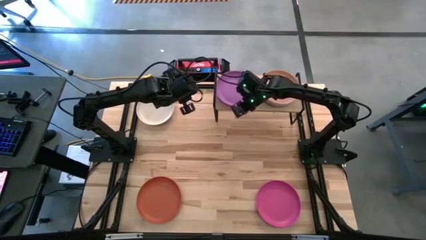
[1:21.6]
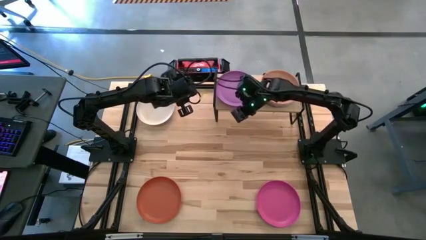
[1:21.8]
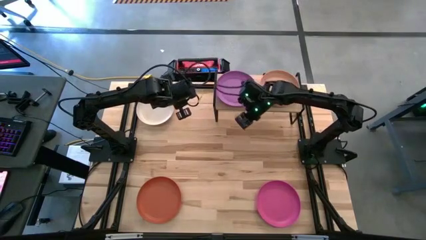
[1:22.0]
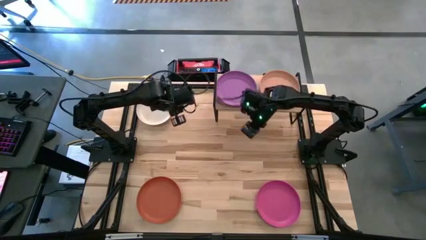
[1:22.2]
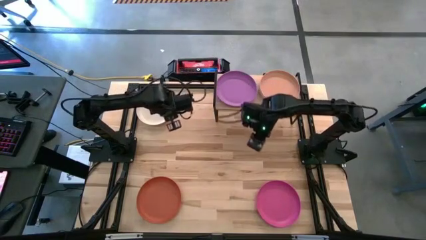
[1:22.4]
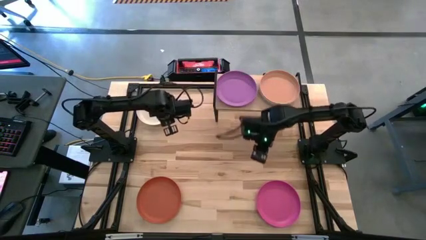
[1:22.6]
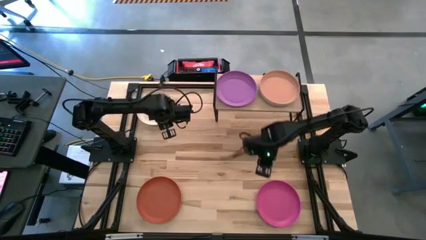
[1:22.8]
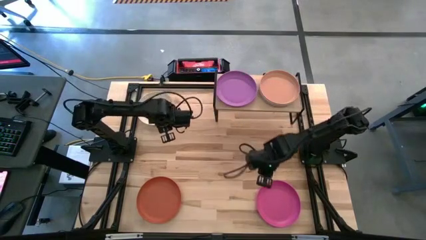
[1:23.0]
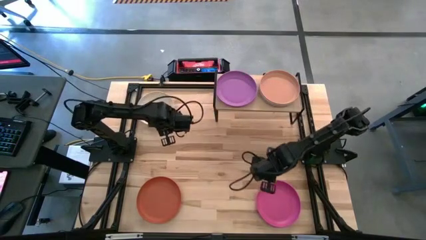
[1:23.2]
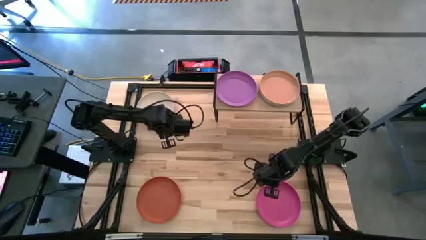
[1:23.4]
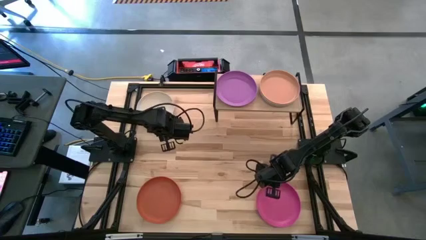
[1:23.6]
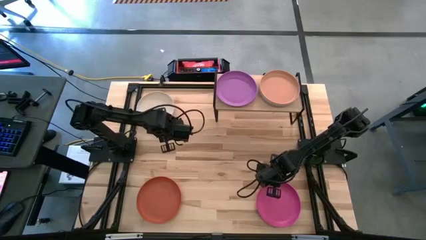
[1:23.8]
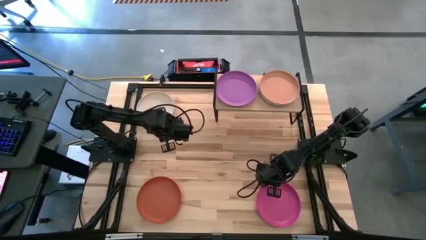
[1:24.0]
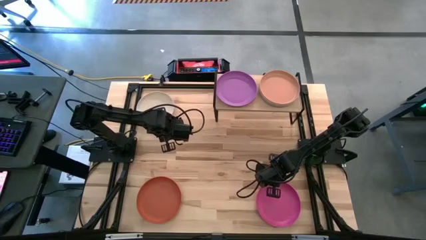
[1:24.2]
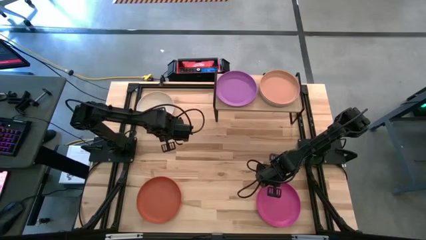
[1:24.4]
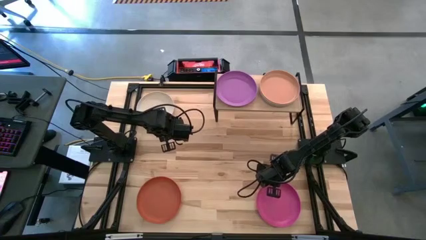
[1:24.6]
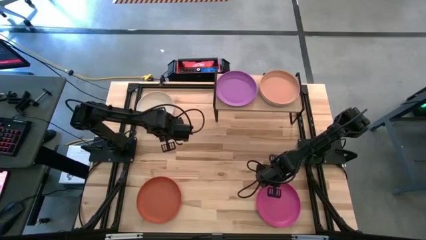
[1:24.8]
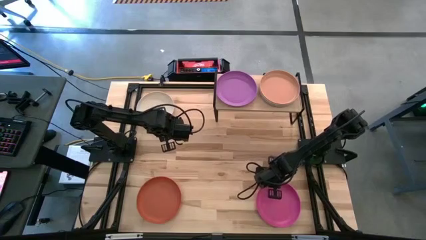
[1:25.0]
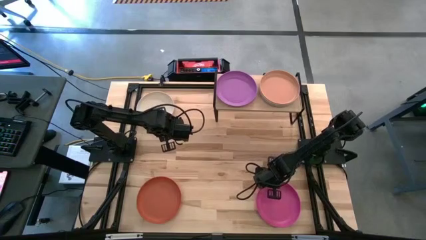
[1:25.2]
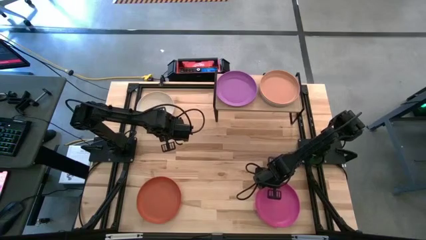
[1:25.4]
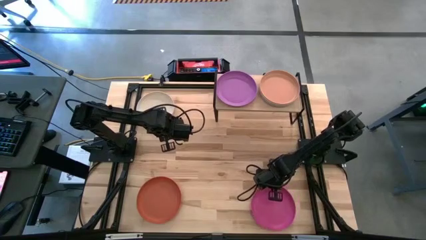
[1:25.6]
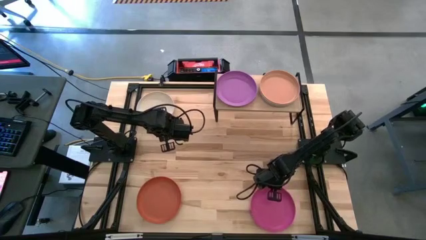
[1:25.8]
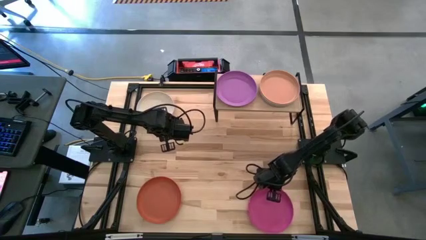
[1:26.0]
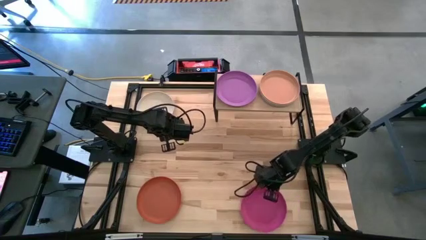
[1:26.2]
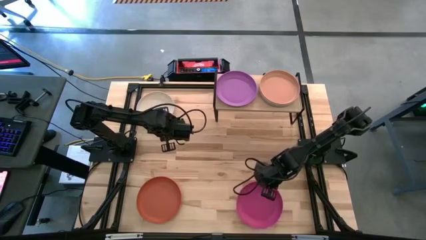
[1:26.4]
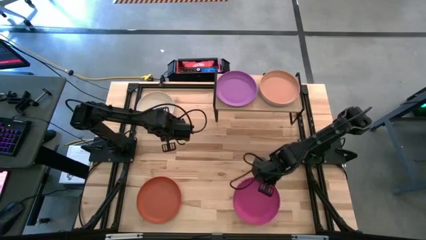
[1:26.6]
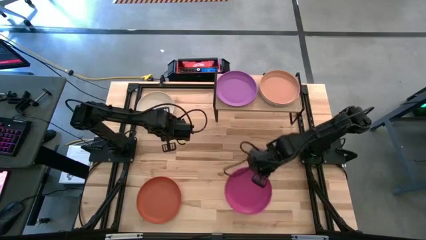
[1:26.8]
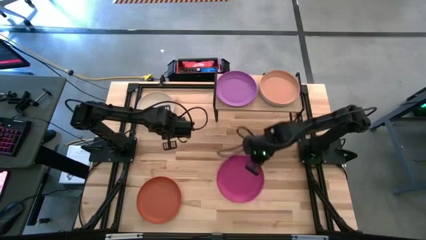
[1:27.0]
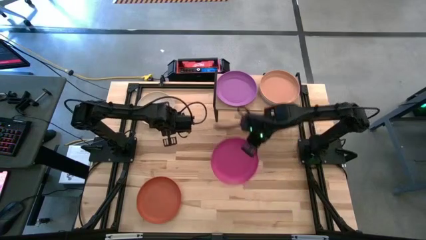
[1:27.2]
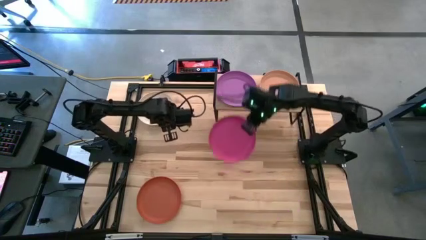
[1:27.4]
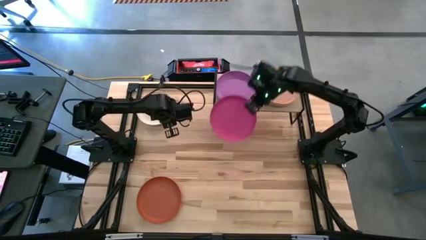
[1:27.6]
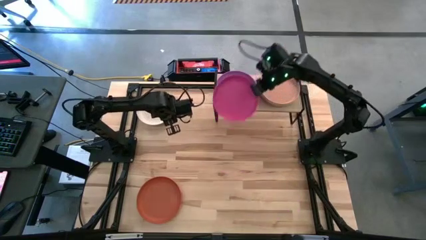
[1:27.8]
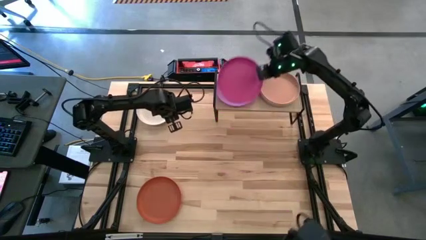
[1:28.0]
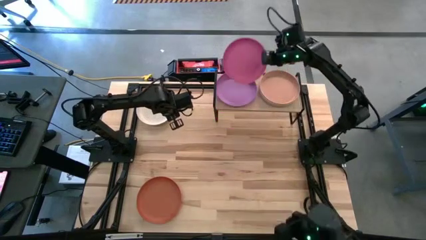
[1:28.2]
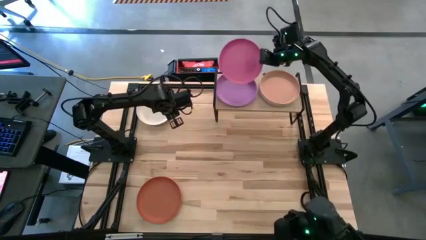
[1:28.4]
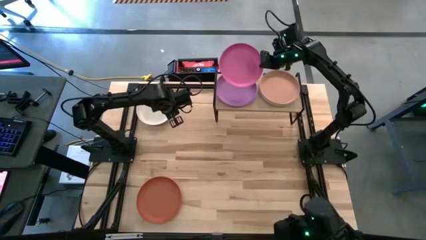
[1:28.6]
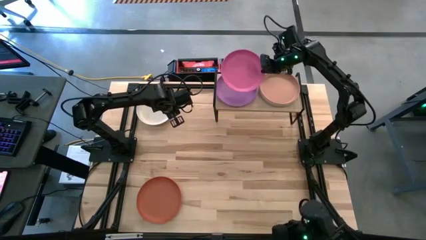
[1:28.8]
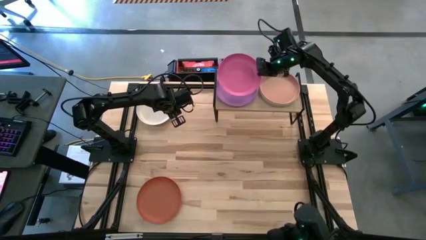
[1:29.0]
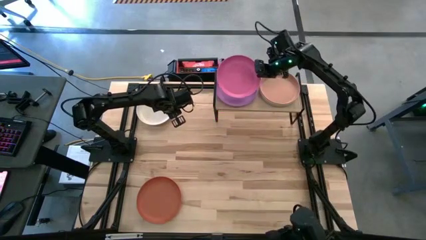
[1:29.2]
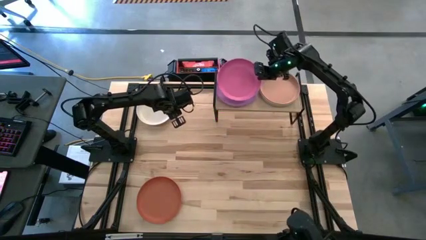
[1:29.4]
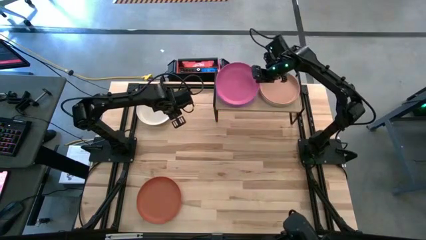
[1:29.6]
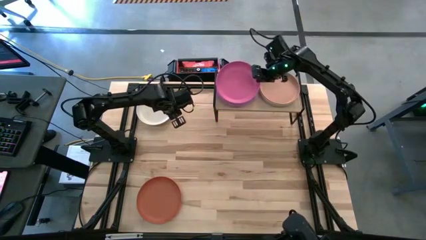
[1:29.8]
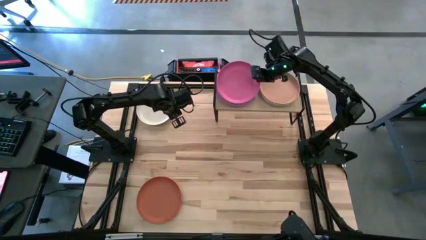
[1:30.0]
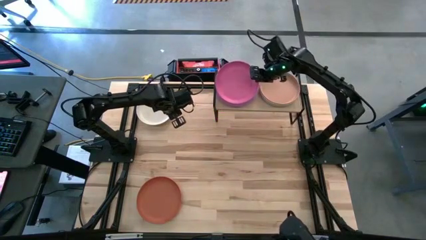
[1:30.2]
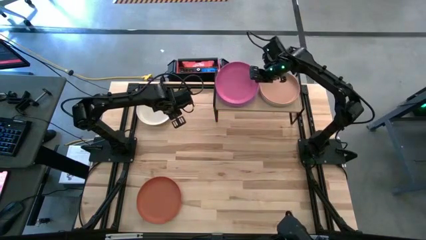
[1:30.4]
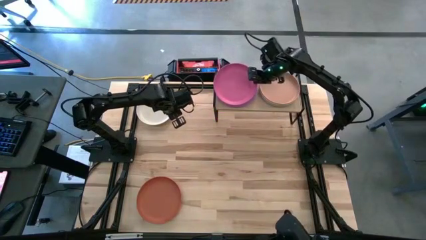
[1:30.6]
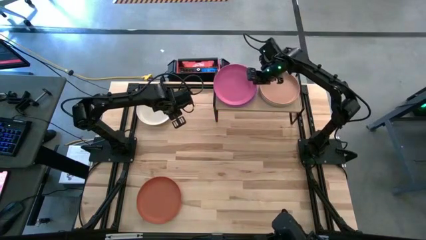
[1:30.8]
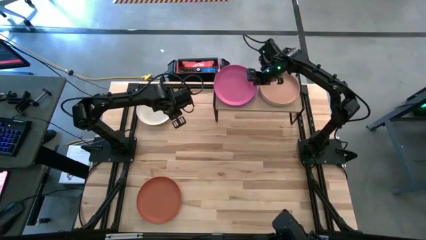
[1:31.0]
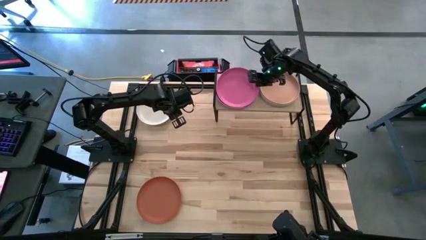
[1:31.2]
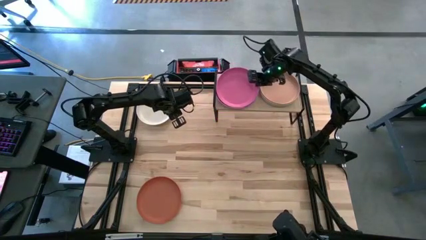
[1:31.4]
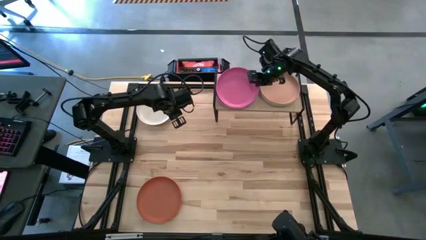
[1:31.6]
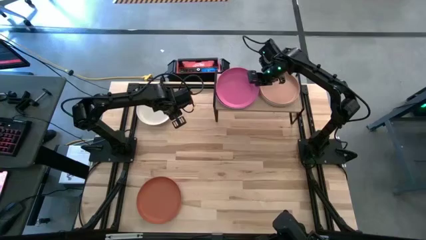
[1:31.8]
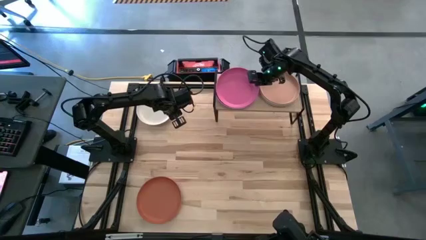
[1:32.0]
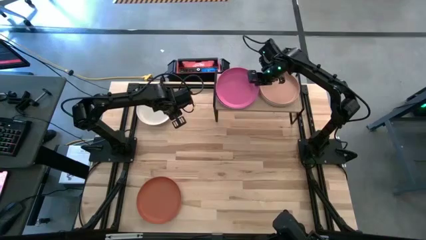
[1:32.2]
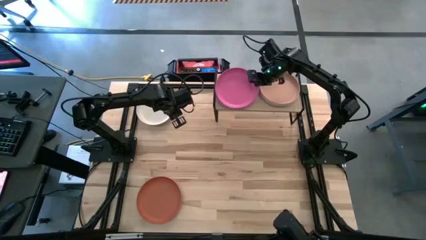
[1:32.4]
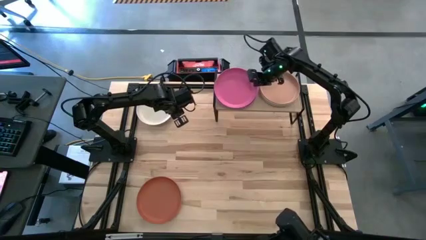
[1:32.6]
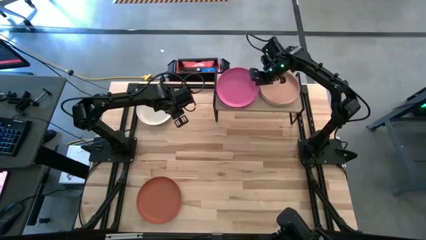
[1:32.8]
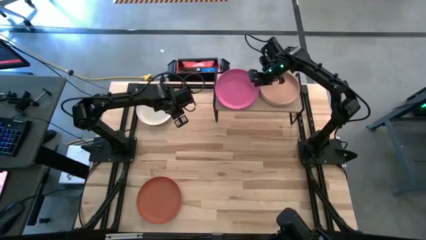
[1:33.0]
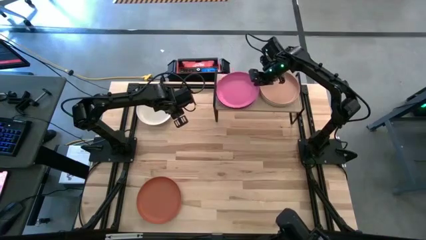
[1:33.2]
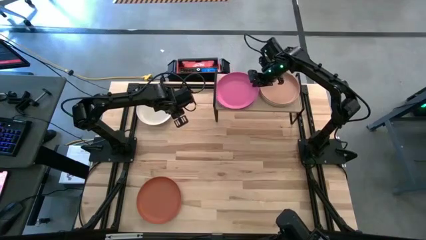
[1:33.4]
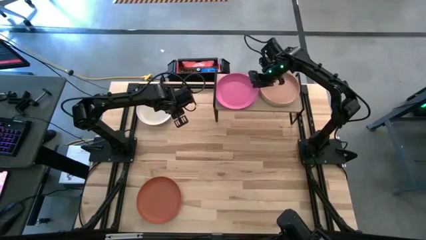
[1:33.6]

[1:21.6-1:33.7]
Task: Place and stack plates onto a shelf
Stack the pink plate on top of the purple stacked plates on the shelf

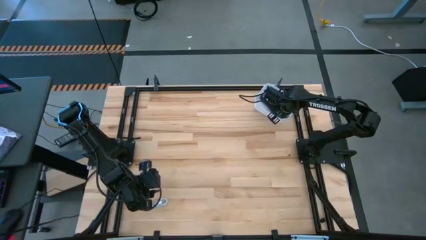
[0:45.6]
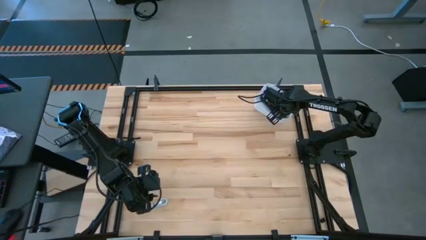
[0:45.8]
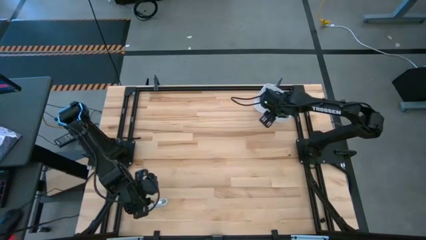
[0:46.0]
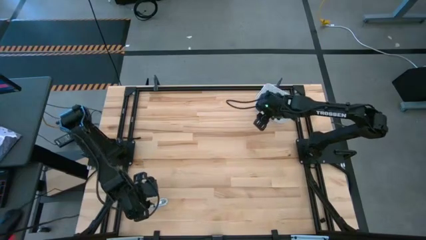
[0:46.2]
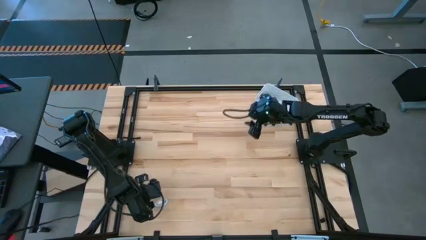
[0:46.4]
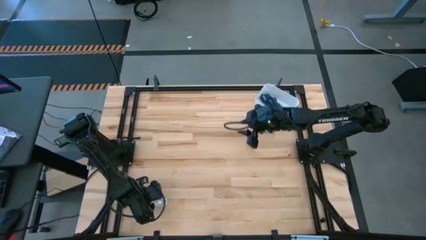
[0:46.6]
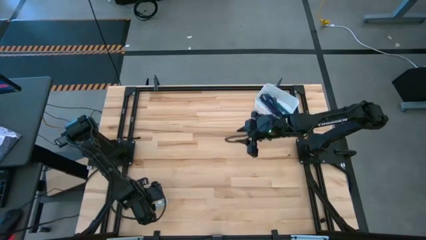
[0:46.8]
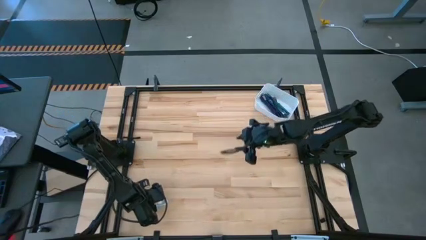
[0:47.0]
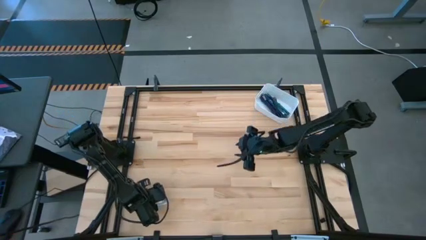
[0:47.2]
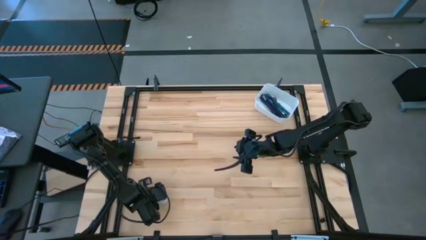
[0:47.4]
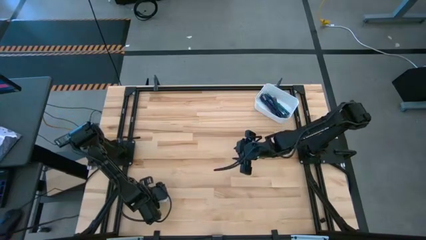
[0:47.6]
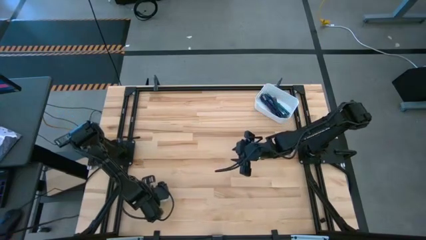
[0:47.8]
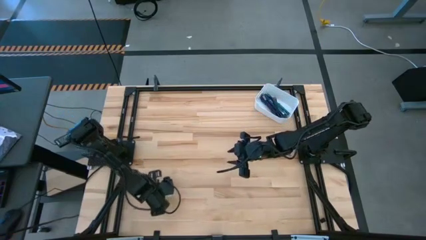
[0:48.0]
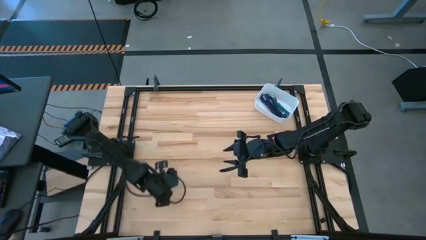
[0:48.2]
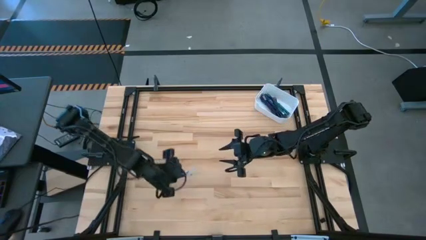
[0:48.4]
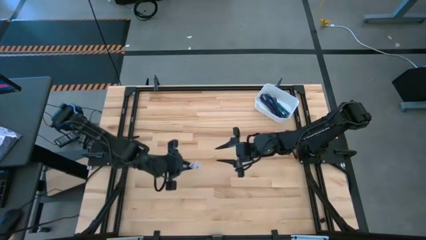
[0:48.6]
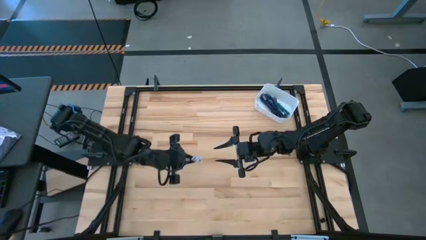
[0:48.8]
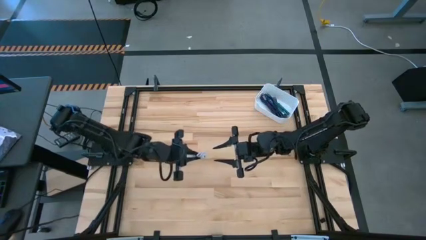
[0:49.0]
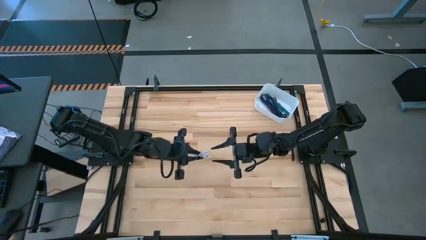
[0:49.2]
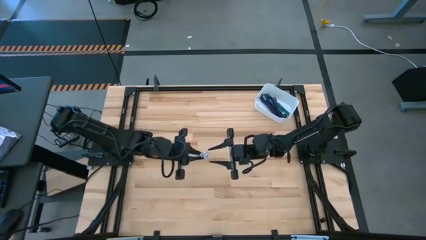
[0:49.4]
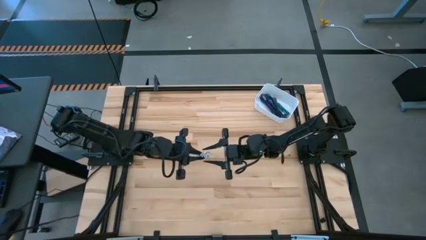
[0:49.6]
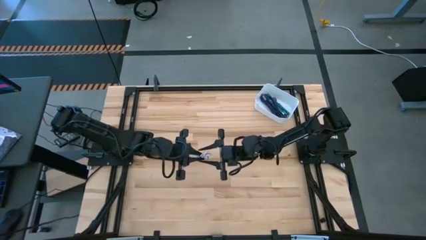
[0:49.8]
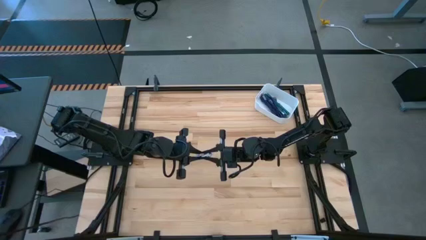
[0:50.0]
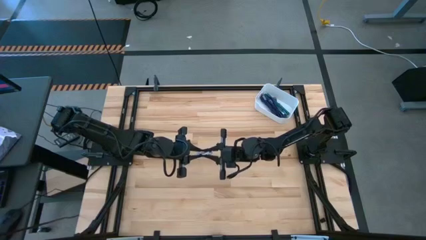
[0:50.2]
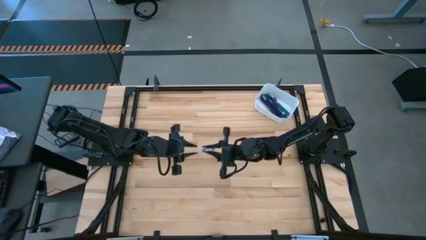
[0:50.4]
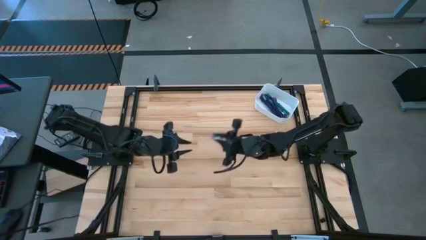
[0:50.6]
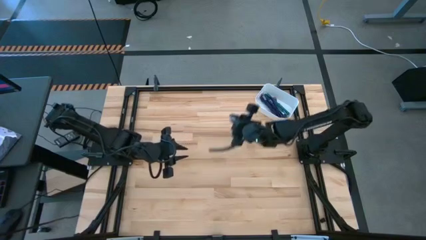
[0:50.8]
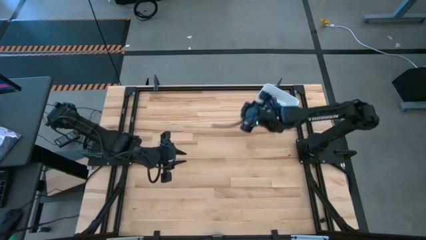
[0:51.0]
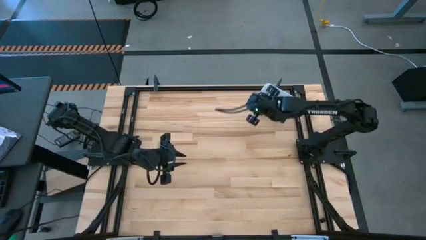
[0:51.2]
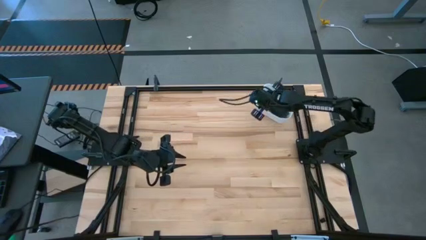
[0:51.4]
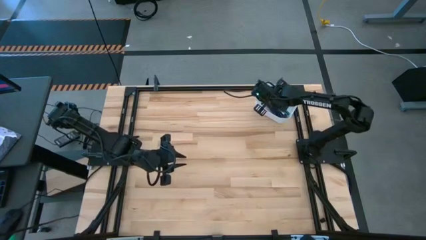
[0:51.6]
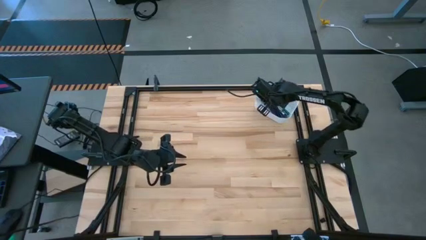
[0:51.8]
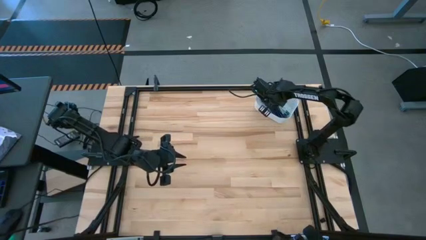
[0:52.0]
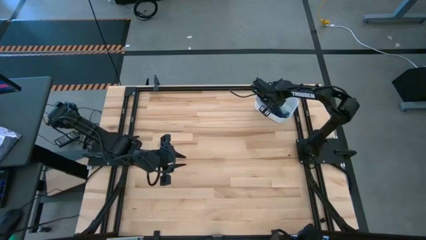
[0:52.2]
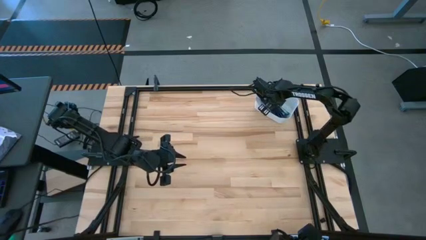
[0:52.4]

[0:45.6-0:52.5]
Task: Pick and place USB-C Cables
Put the white charger cable into the white bin
